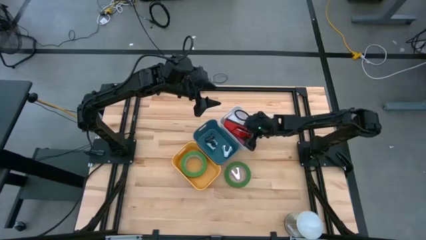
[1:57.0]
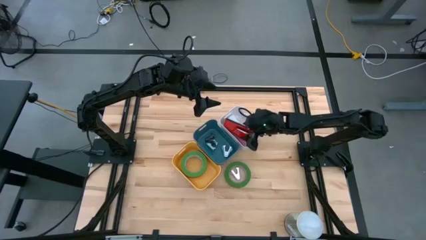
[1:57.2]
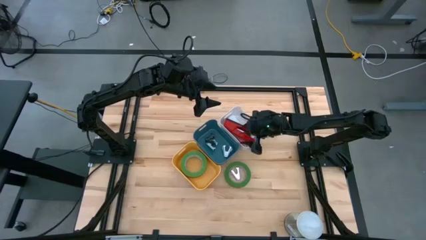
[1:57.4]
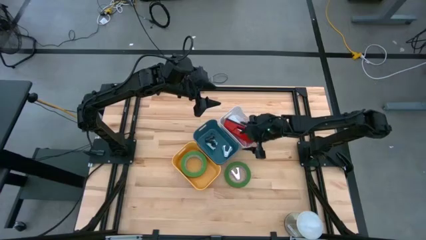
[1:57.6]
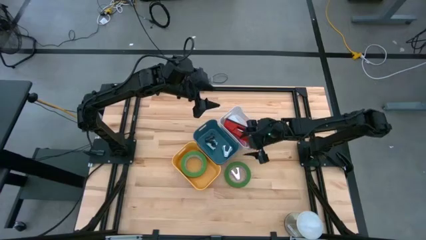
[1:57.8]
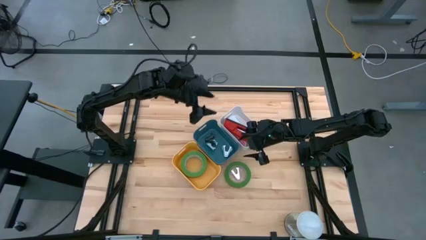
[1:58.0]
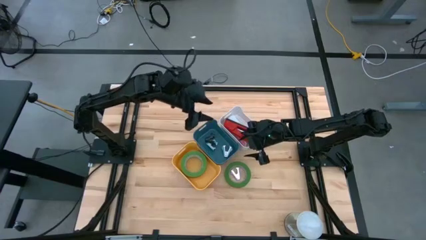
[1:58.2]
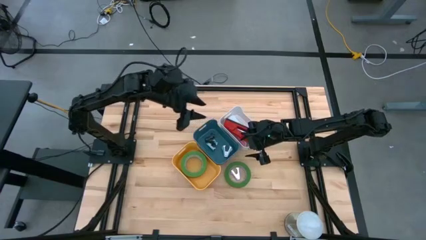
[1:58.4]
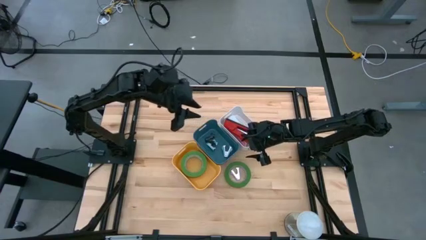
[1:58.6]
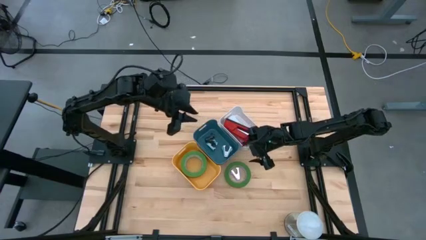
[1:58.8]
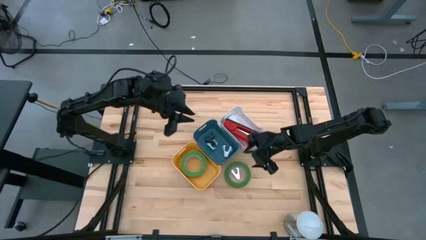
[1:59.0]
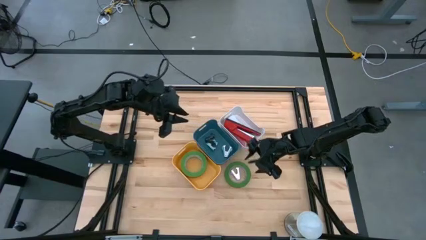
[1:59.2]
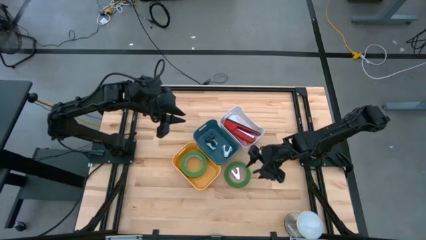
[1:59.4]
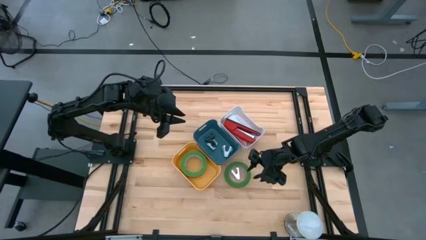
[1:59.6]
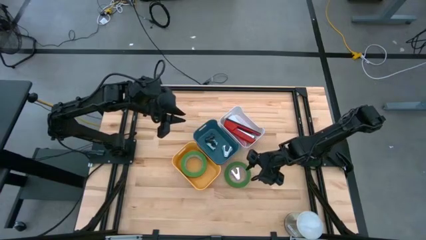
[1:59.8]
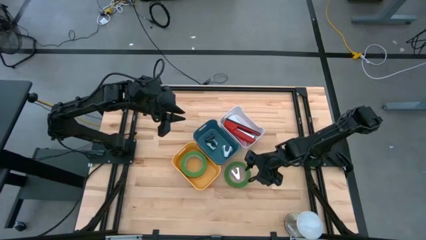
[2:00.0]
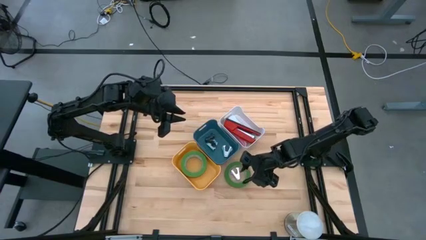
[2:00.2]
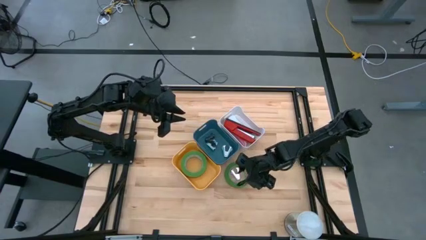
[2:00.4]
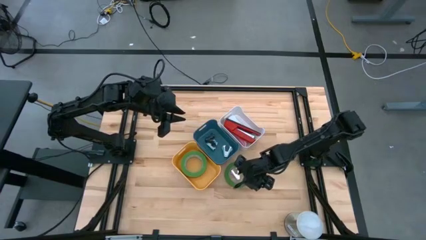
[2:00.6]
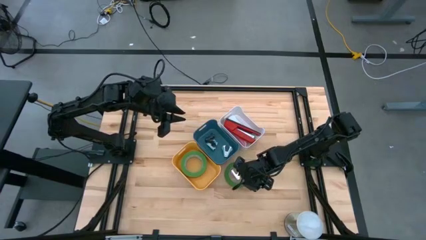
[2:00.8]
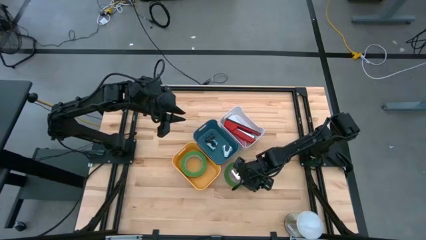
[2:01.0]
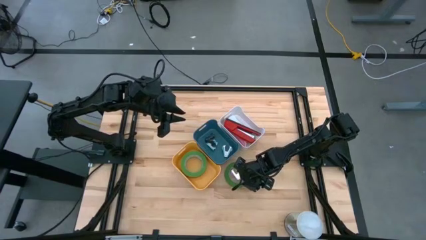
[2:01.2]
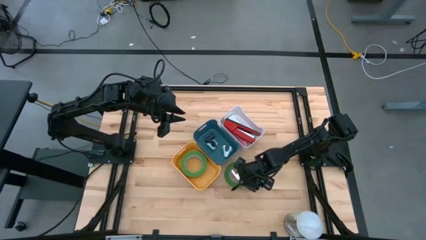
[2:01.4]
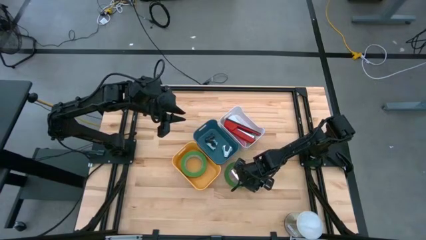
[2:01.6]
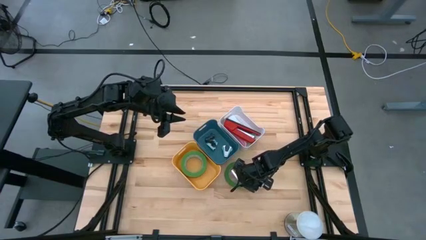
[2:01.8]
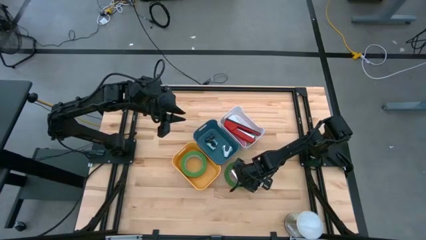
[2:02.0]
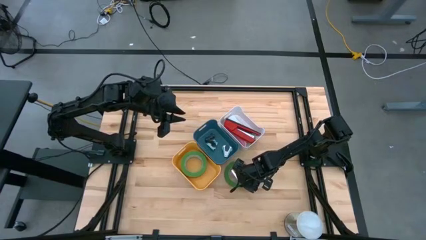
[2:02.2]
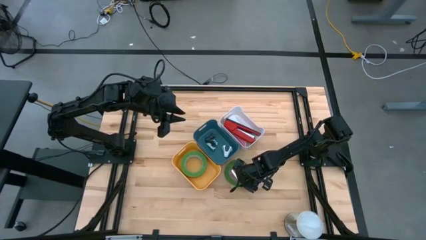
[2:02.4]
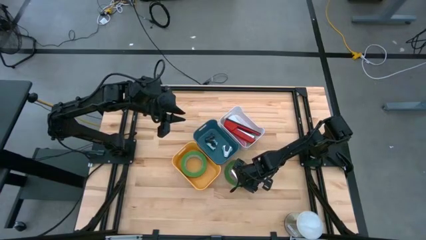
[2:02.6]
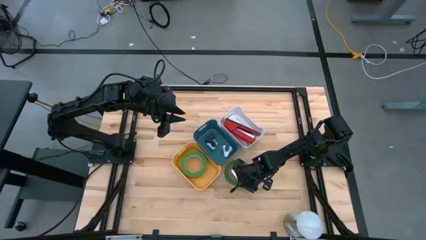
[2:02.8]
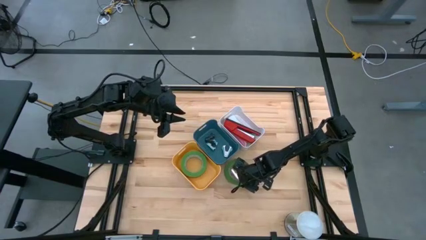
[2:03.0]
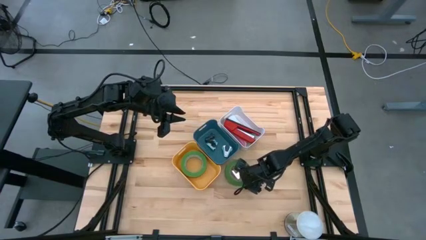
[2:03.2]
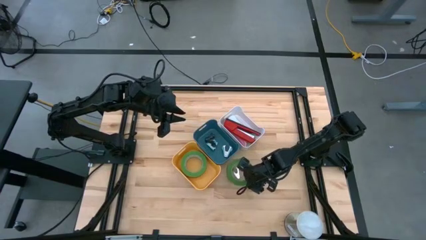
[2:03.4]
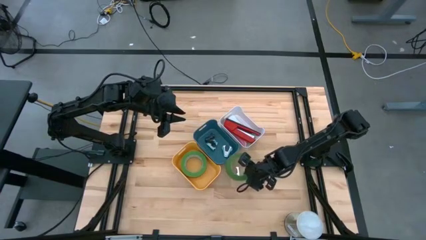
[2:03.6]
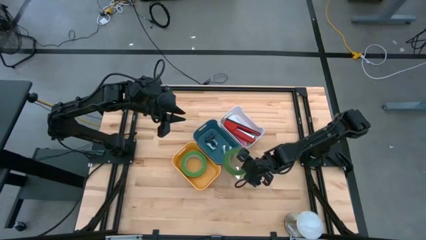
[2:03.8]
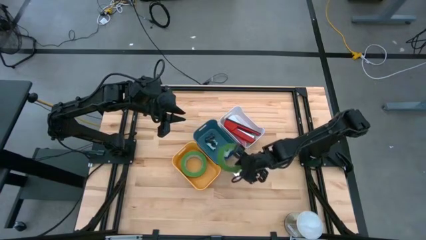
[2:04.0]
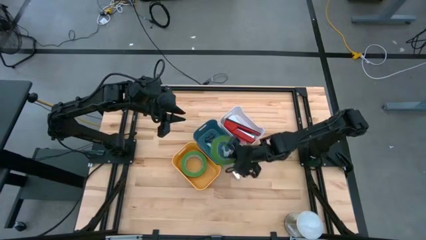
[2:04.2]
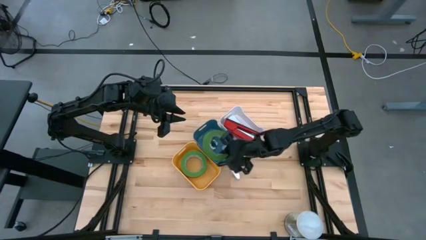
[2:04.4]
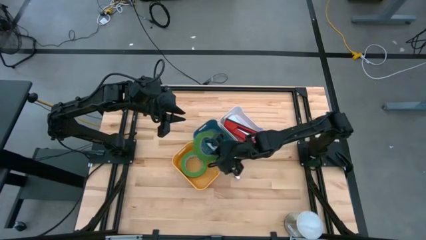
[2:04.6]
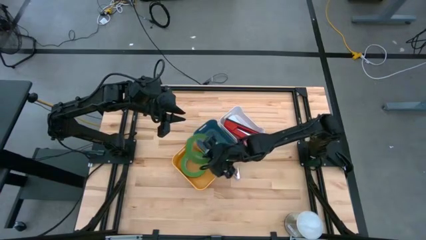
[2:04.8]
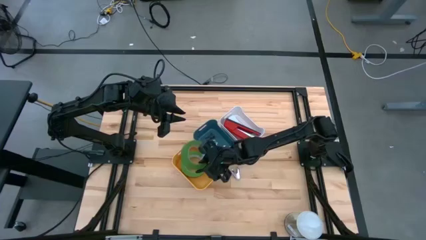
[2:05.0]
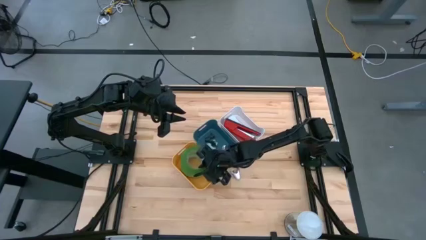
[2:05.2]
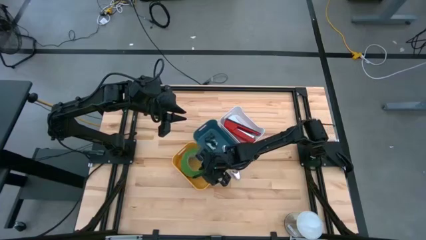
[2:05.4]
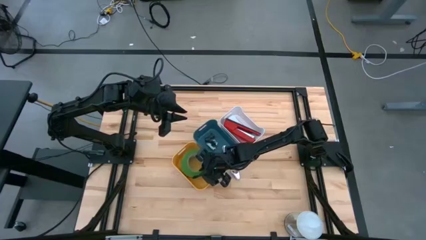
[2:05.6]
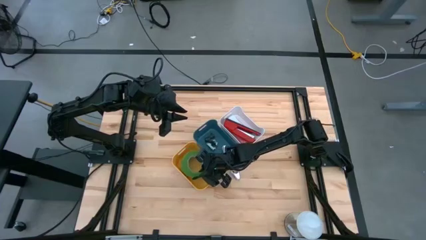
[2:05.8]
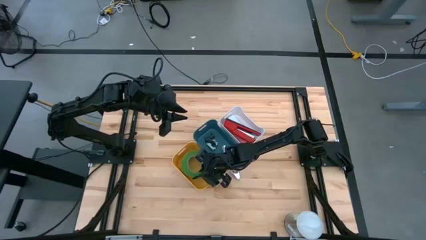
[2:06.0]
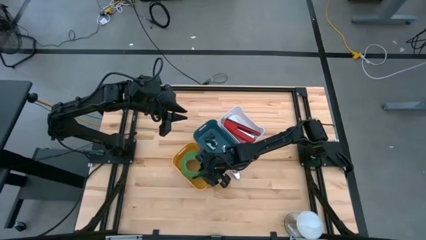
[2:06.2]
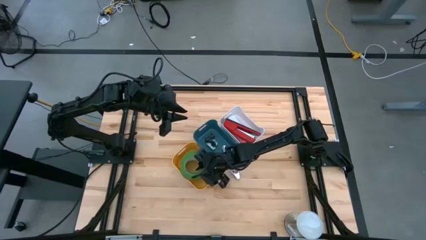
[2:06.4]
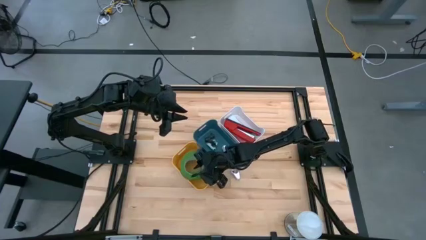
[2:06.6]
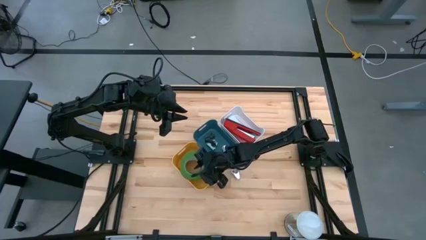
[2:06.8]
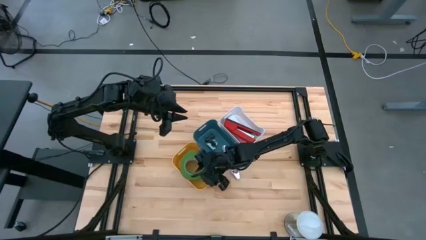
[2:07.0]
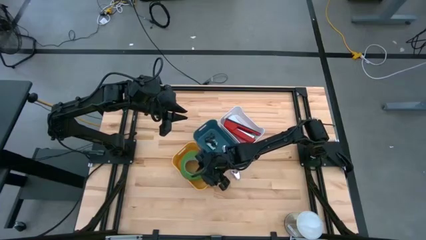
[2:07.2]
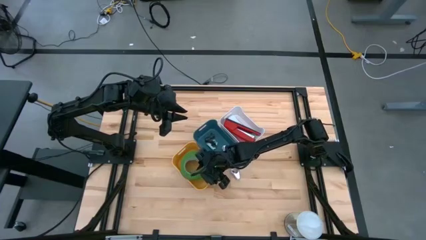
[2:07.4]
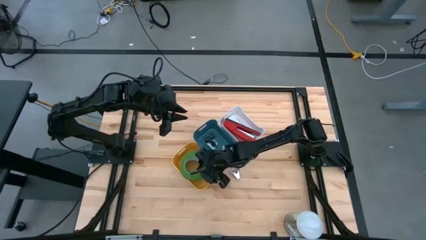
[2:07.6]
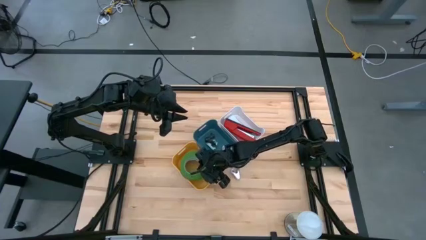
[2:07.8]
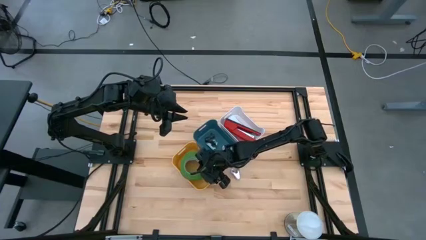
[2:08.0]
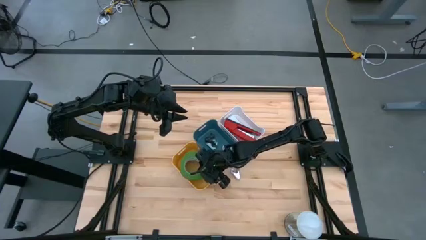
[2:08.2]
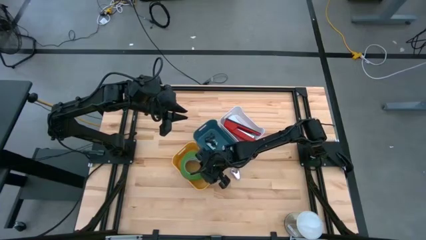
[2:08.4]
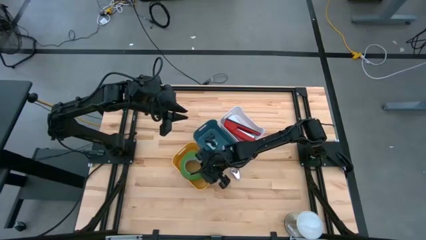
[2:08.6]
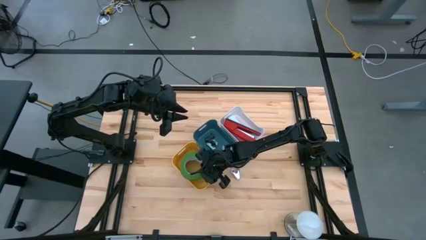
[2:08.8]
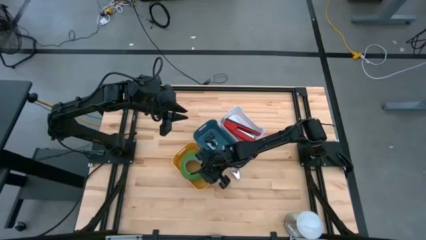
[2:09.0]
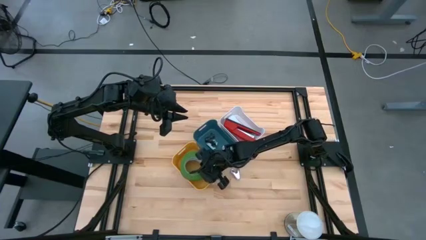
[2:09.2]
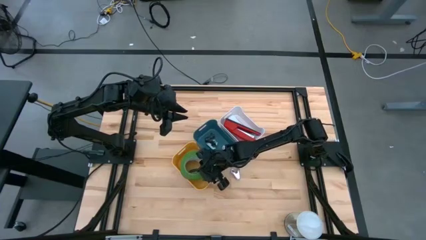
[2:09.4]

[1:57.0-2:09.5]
Task: Pick and place Stapler, Stapler remover, tape
Put the green tape into the yellow bin

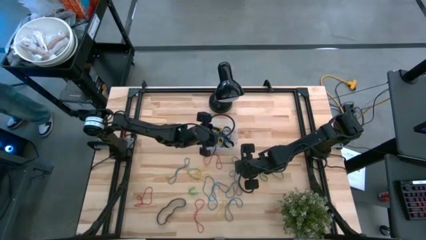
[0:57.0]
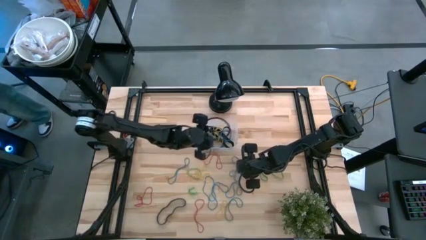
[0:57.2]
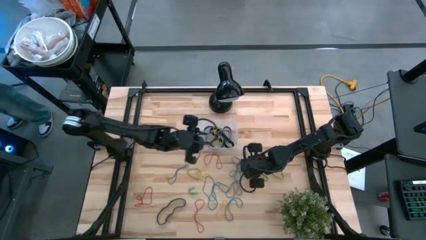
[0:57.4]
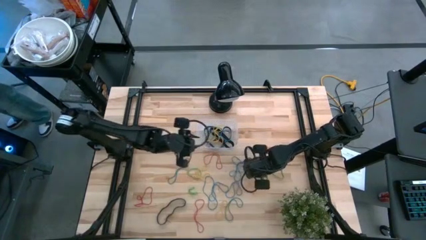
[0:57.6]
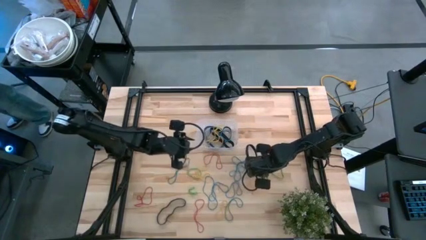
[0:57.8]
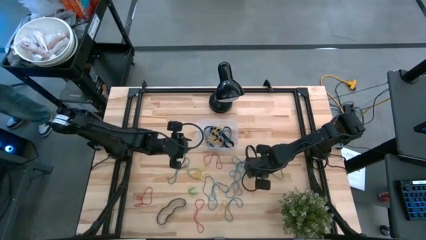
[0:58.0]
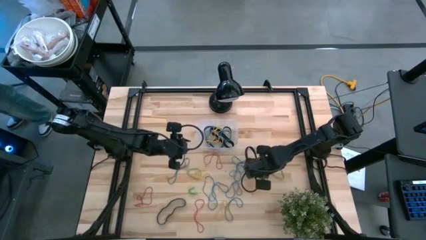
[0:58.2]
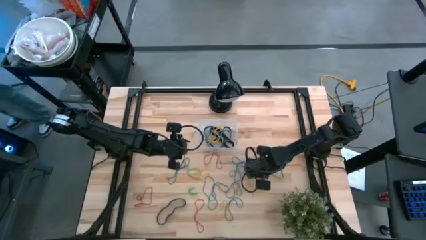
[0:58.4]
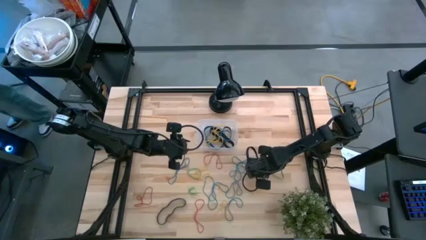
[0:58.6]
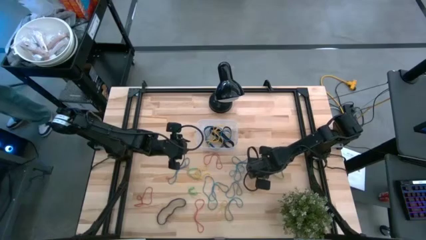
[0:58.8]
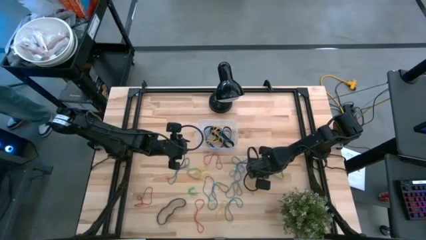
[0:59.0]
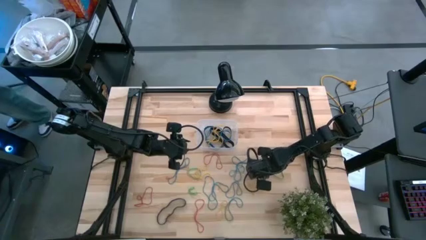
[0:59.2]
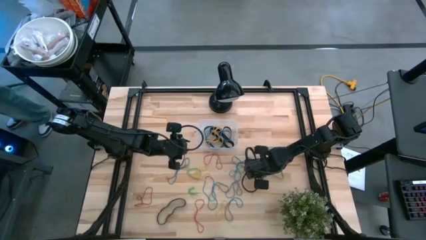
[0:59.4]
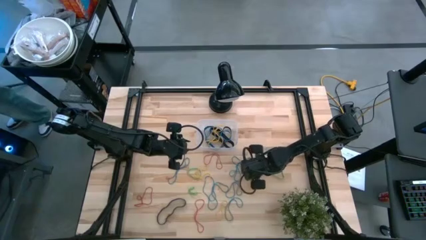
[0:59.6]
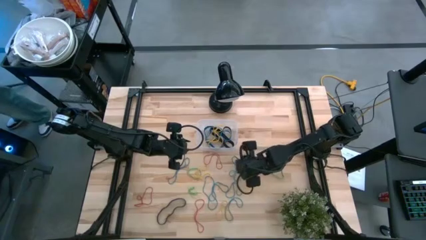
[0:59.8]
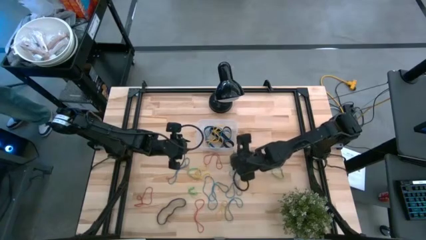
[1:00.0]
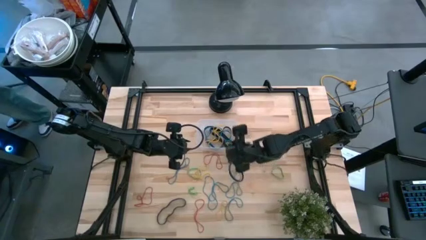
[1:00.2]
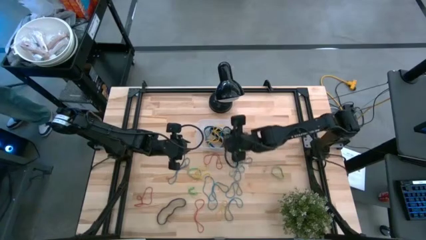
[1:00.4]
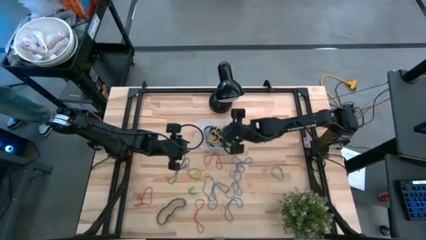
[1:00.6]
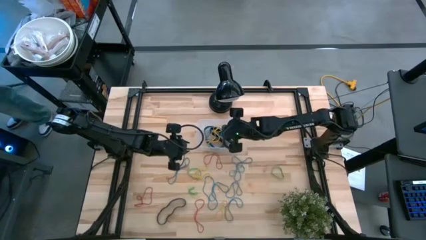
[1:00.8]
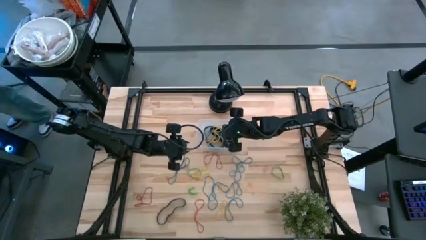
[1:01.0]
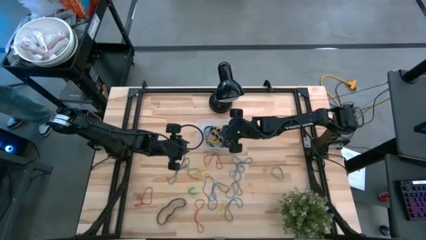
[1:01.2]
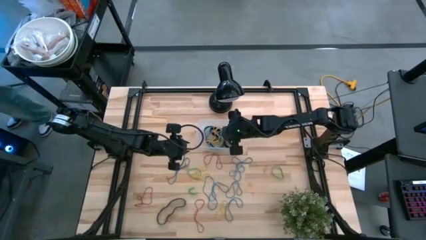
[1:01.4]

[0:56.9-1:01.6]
Task: Pick and place rubber bands into bin
Put the green rubber band into the transparent bin
